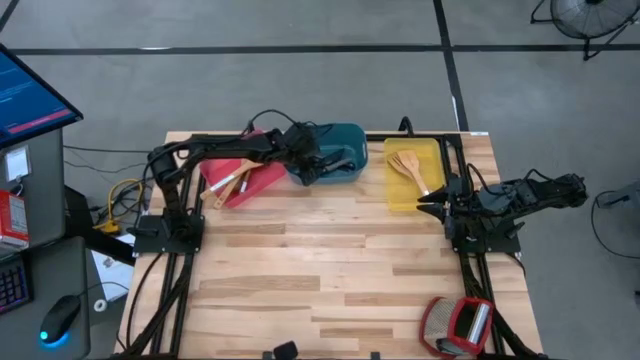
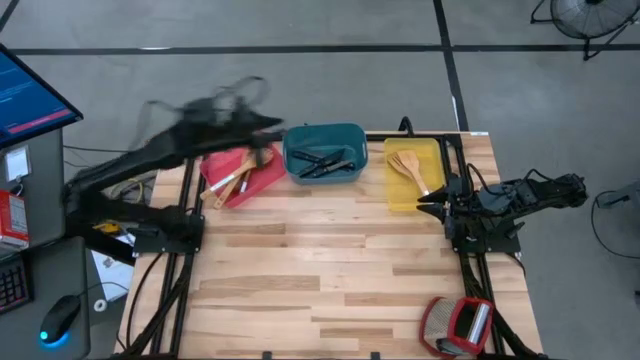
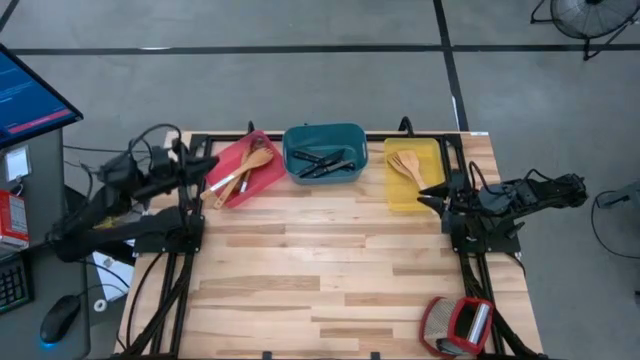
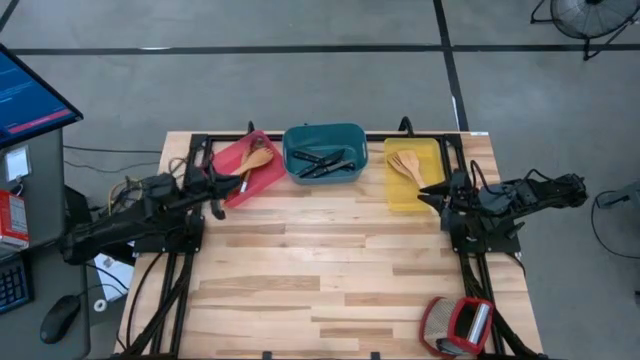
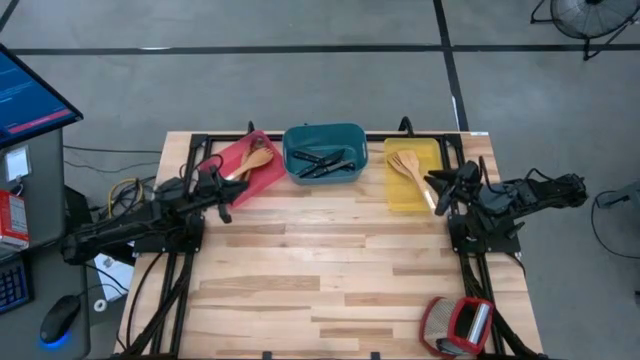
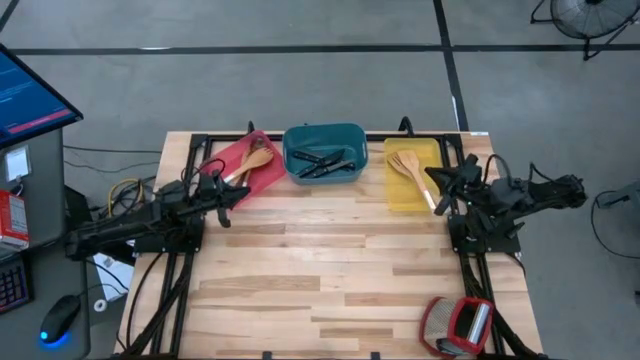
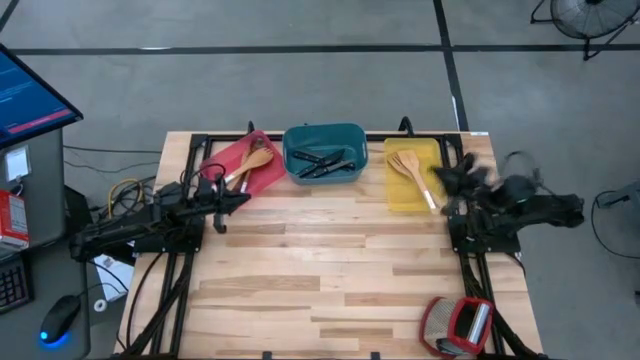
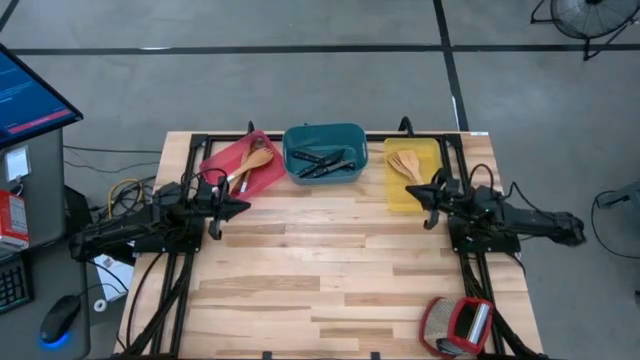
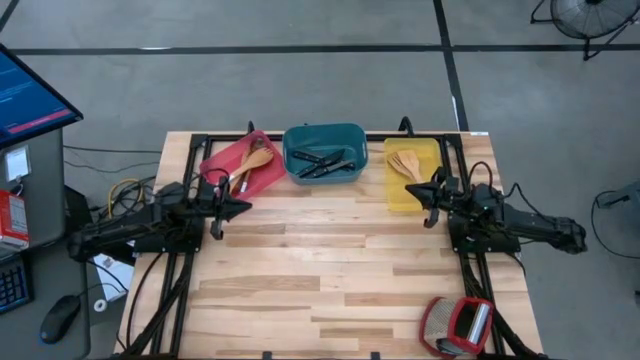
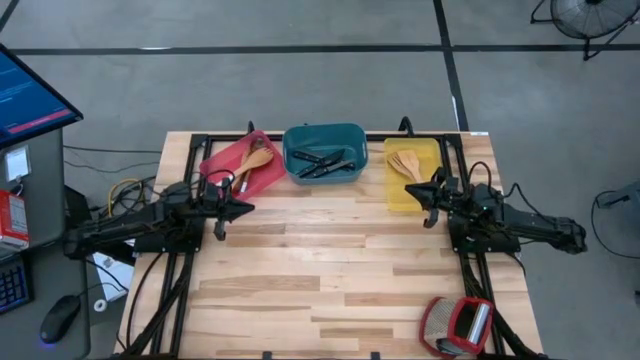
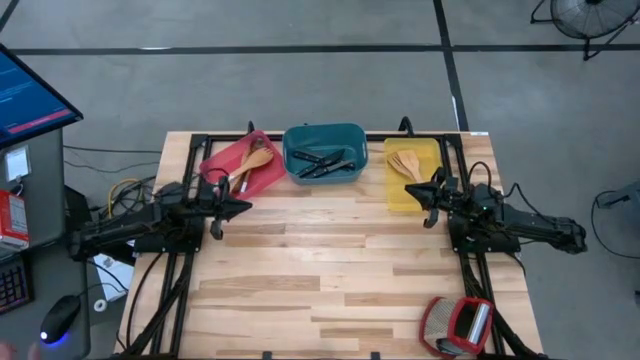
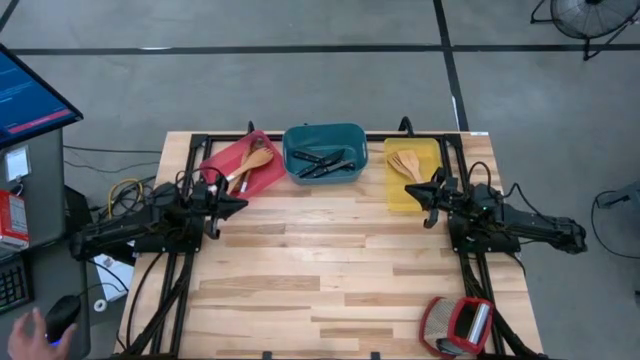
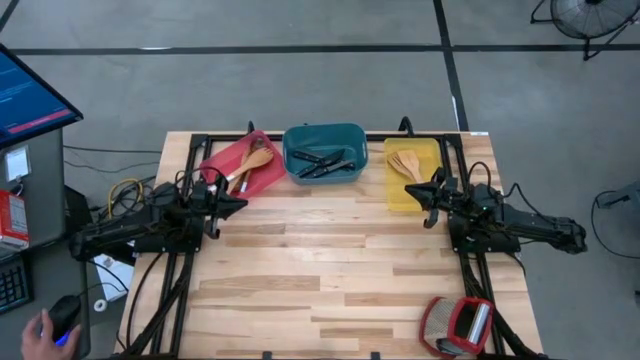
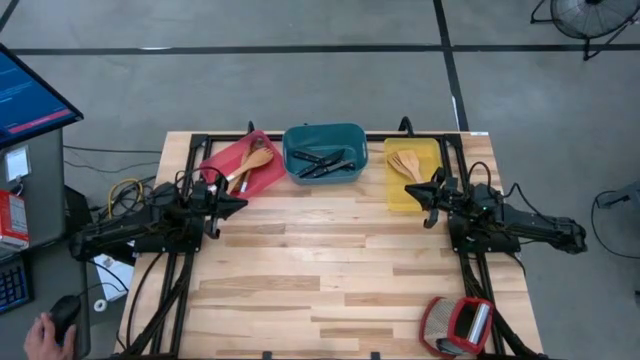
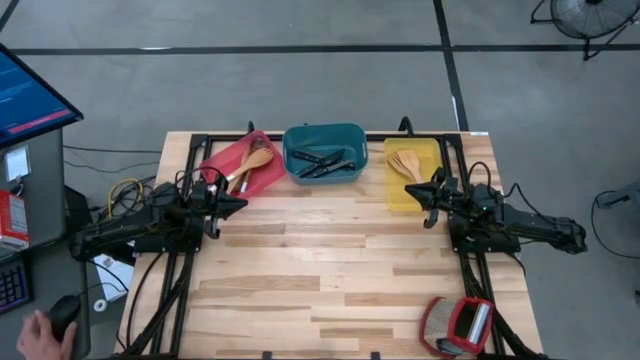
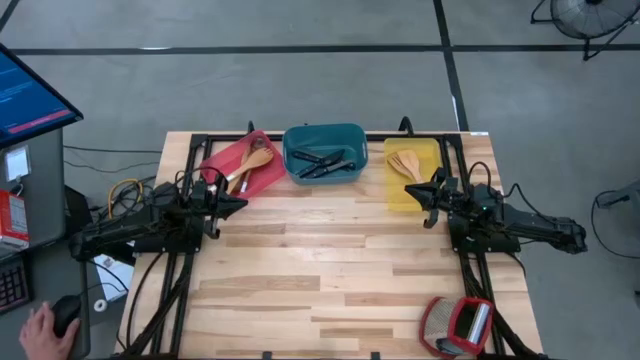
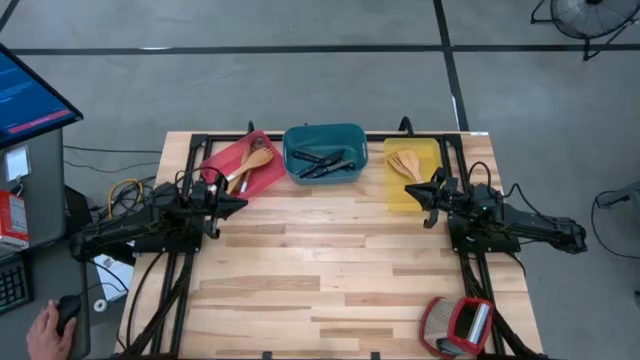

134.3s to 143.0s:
Task: Pick & Place Kitchen Items
Return to Home Position

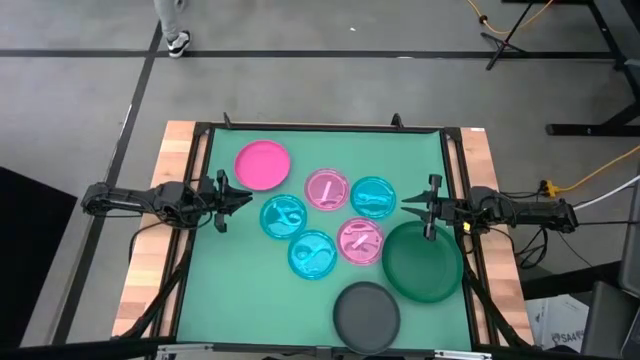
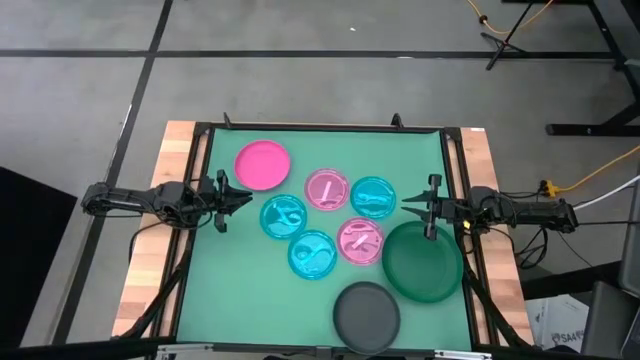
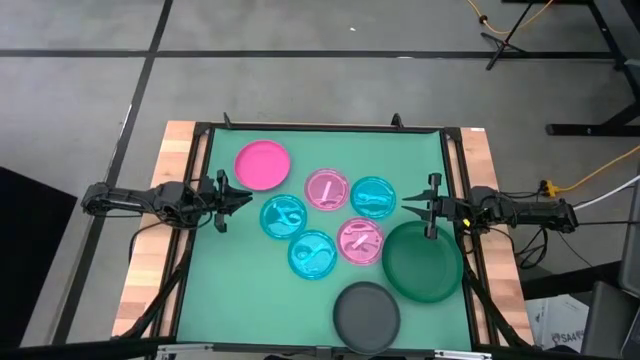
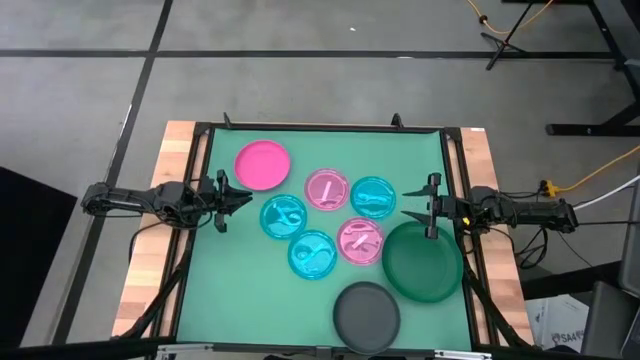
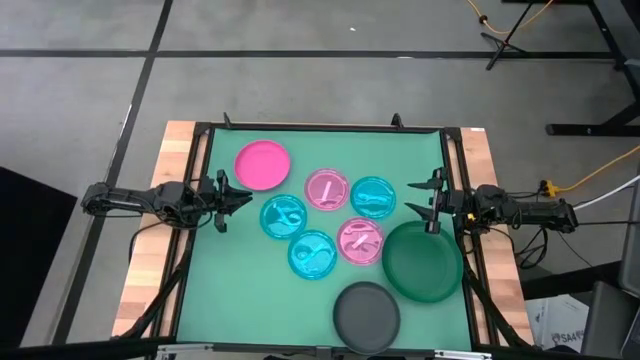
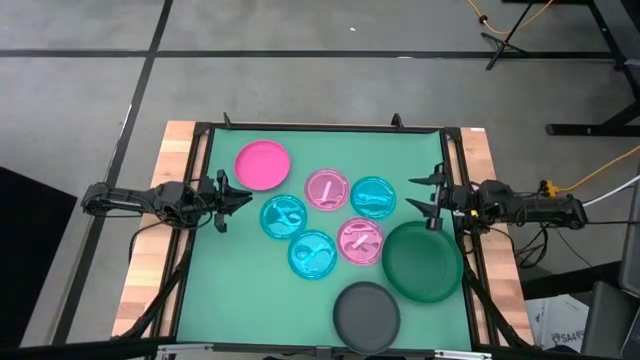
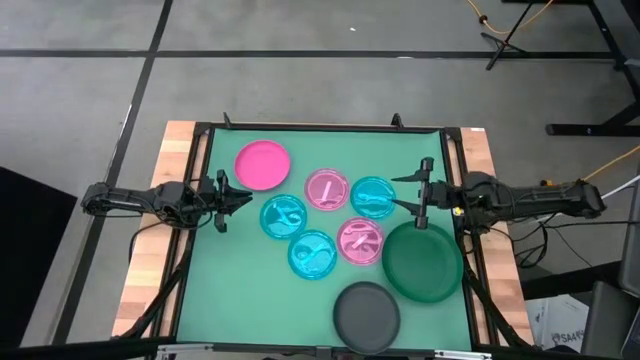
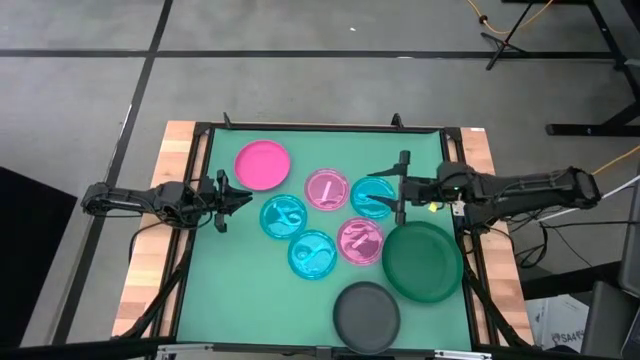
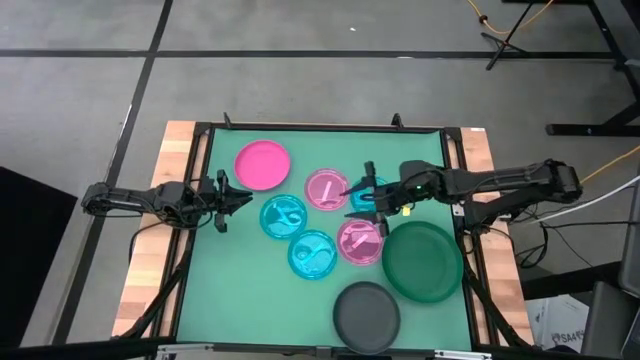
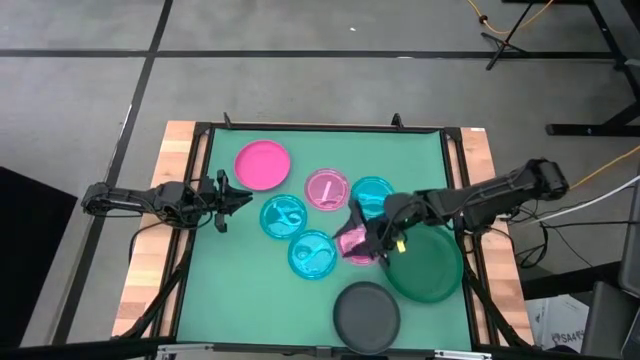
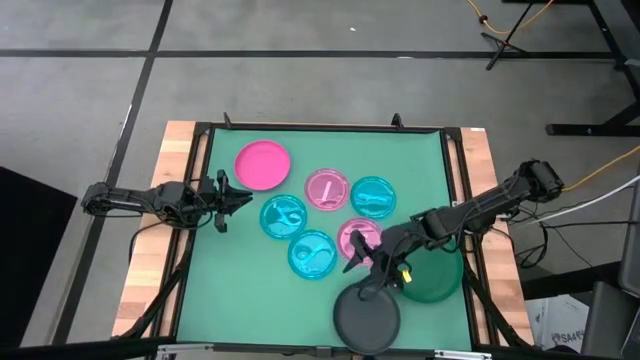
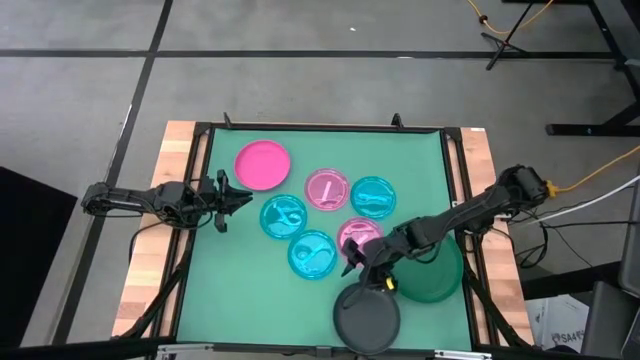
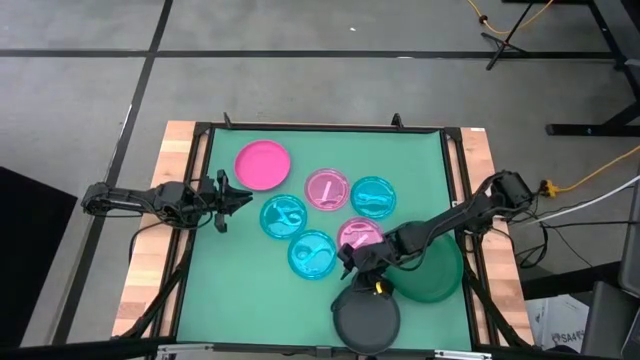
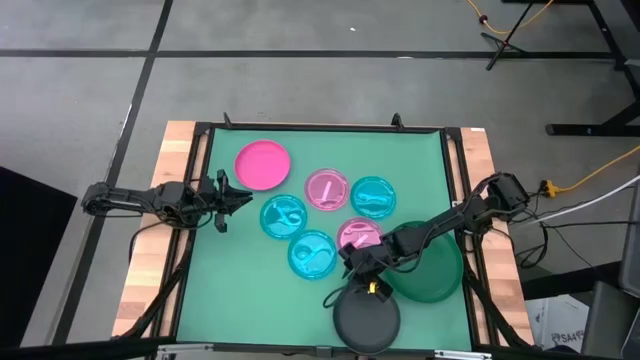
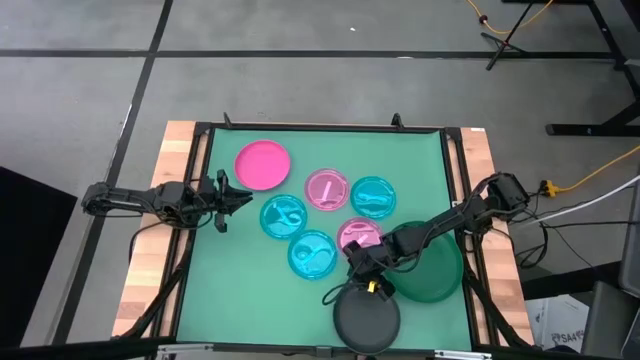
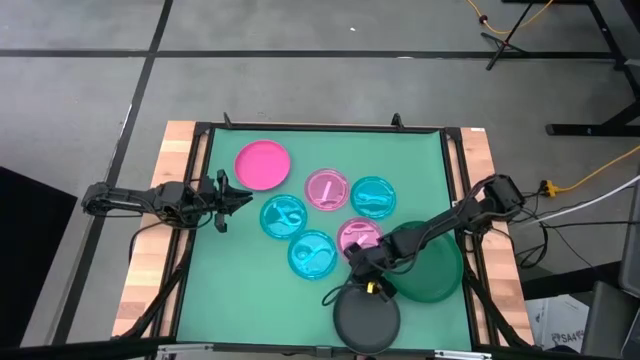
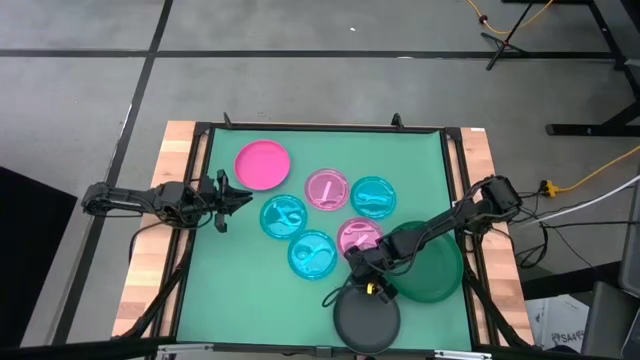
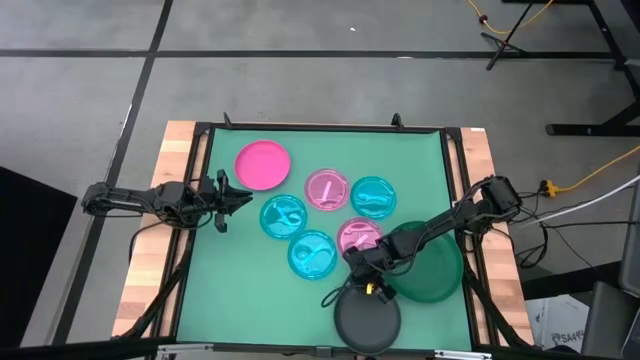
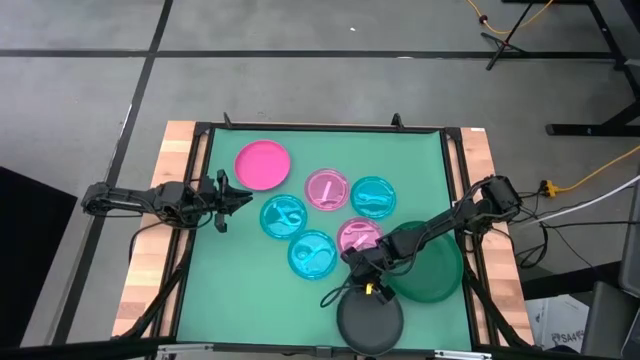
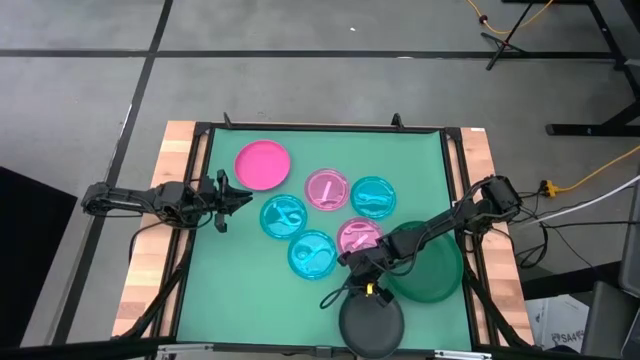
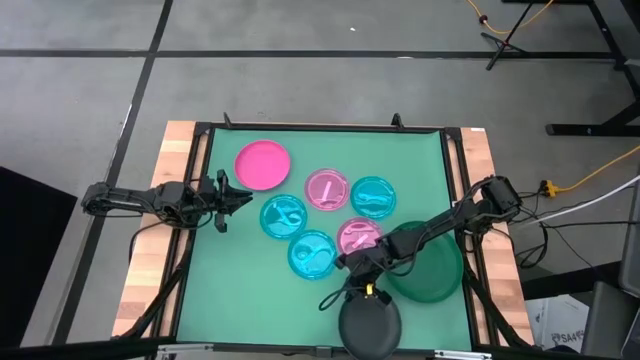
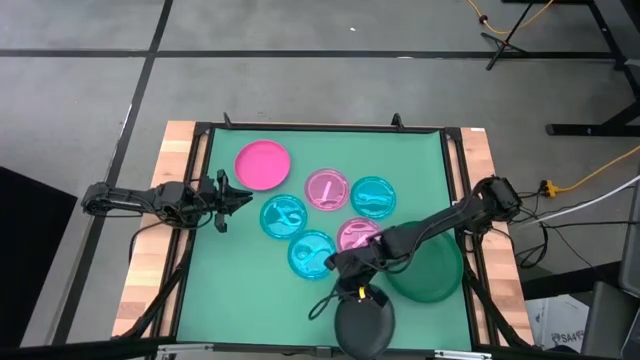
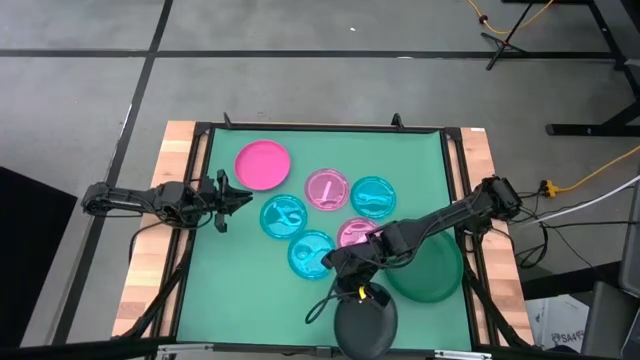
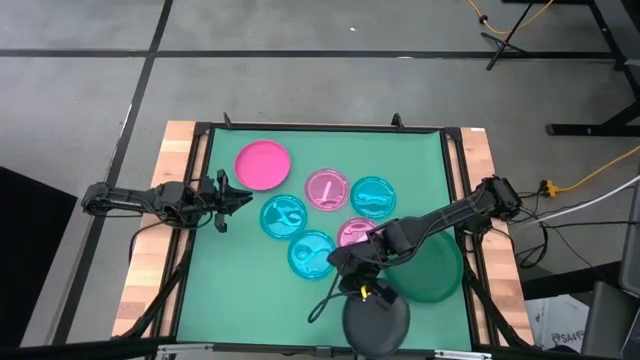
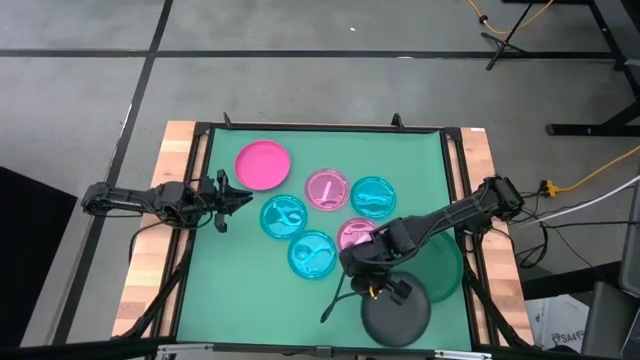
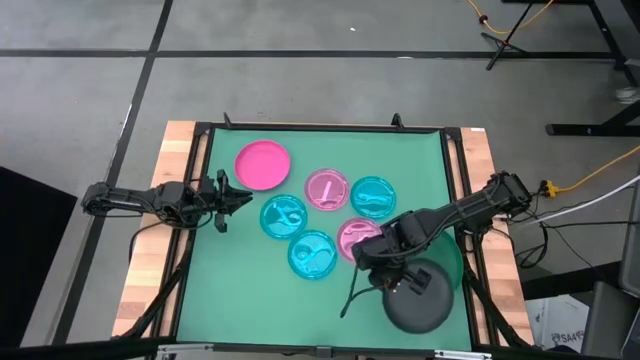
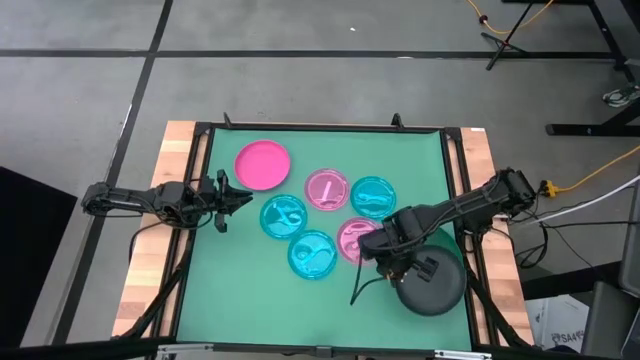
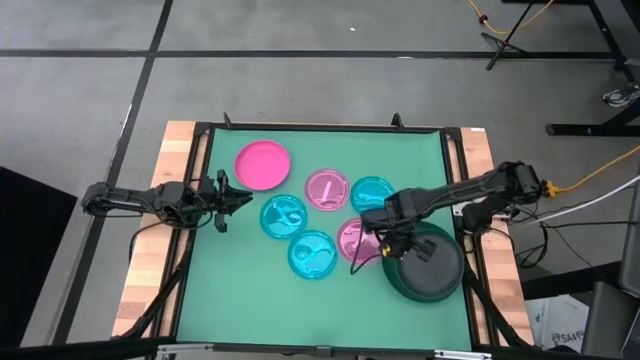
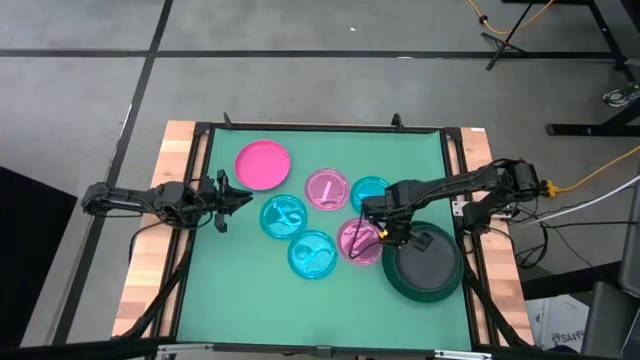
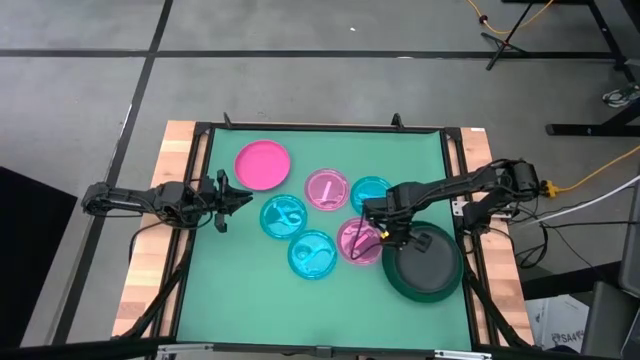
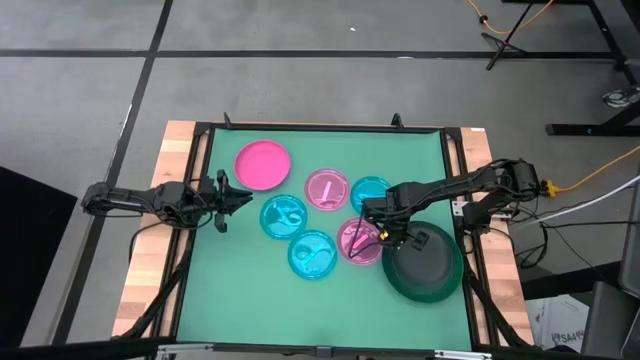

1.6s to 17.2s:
Task: Stack plastic plates
Stack the black plate on top of the green plate
